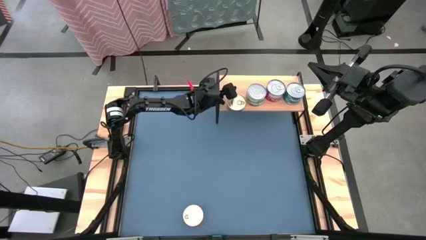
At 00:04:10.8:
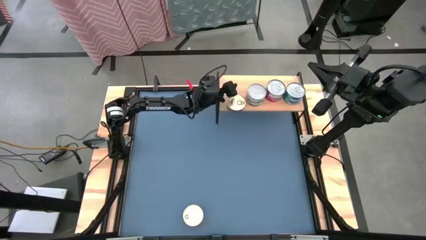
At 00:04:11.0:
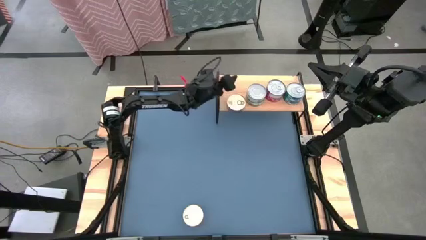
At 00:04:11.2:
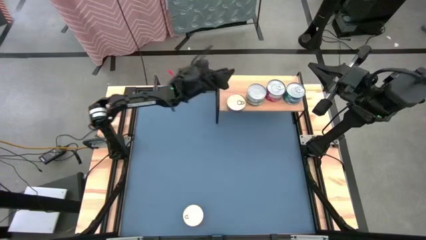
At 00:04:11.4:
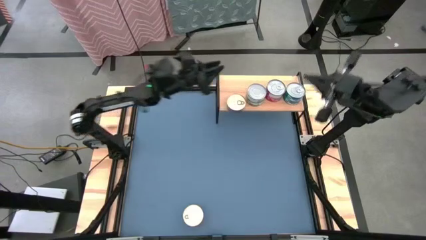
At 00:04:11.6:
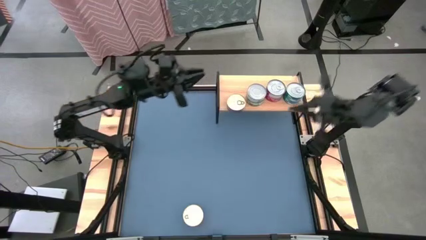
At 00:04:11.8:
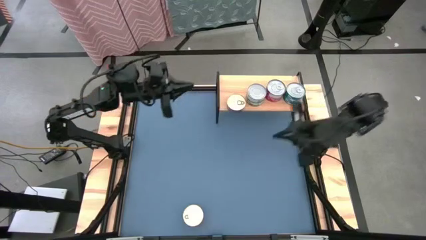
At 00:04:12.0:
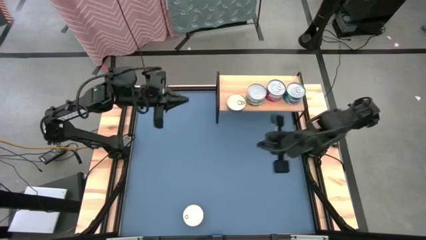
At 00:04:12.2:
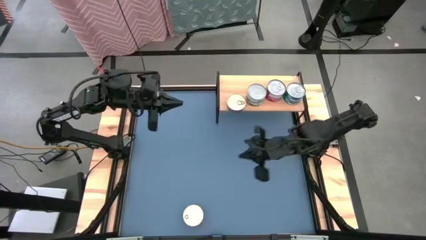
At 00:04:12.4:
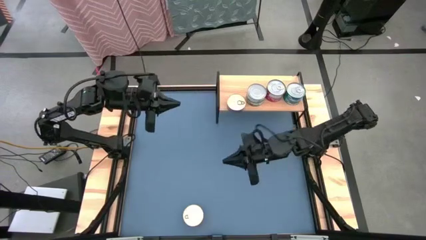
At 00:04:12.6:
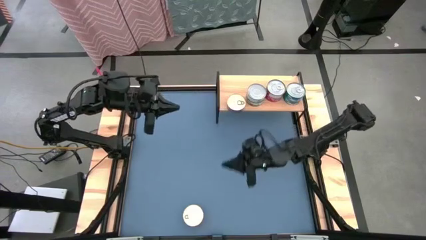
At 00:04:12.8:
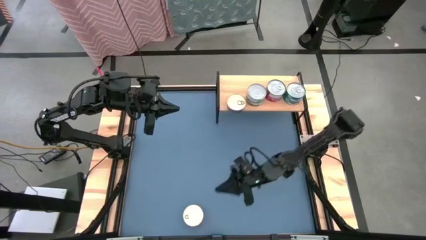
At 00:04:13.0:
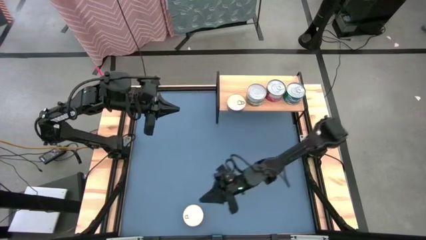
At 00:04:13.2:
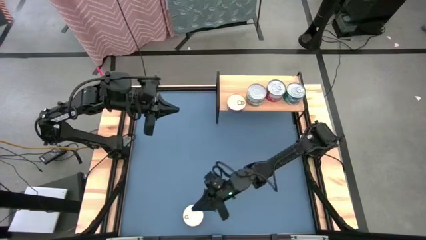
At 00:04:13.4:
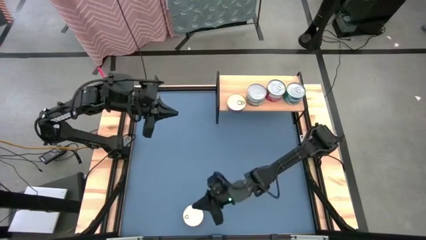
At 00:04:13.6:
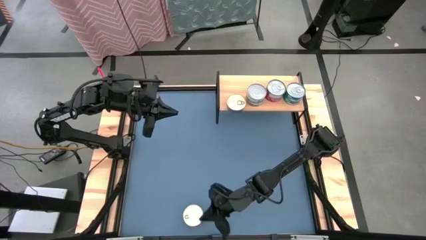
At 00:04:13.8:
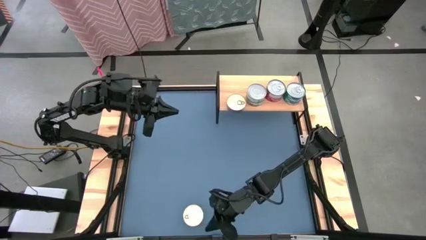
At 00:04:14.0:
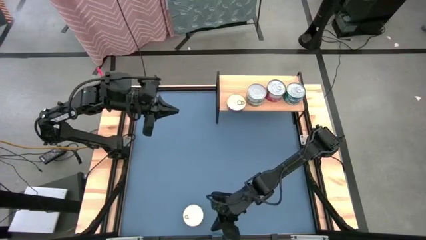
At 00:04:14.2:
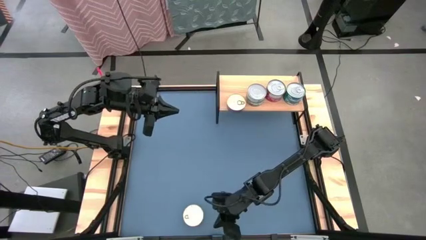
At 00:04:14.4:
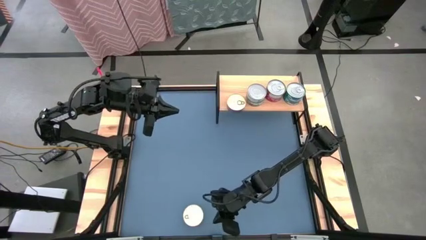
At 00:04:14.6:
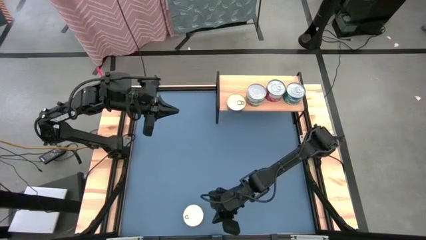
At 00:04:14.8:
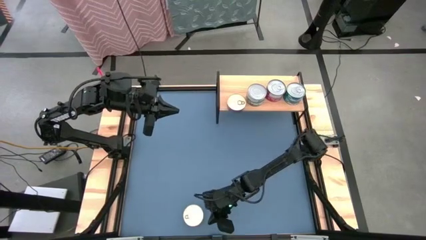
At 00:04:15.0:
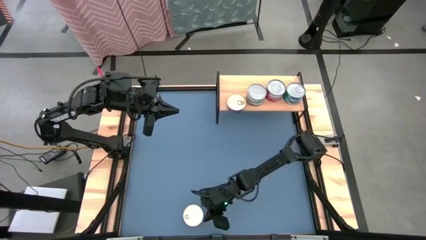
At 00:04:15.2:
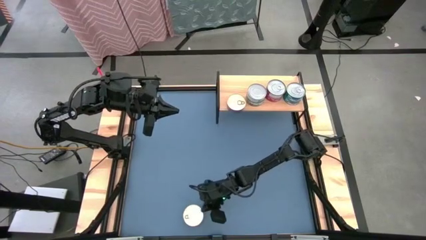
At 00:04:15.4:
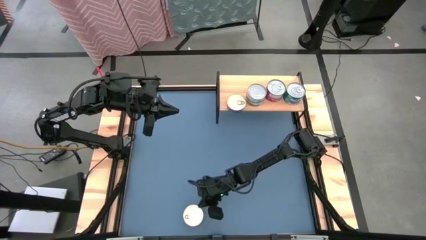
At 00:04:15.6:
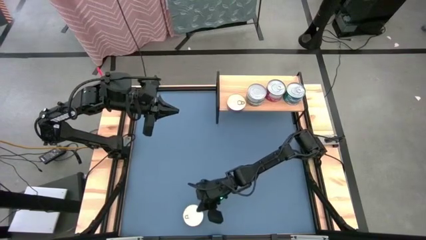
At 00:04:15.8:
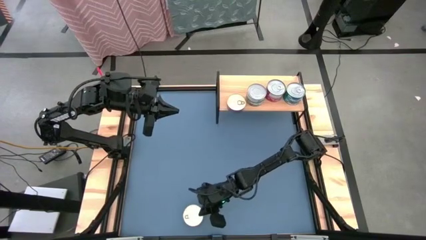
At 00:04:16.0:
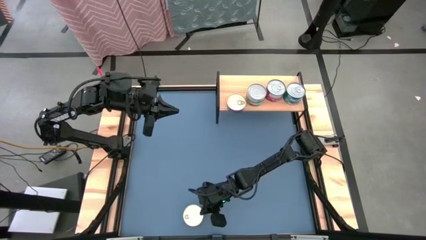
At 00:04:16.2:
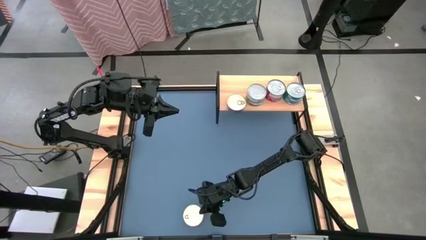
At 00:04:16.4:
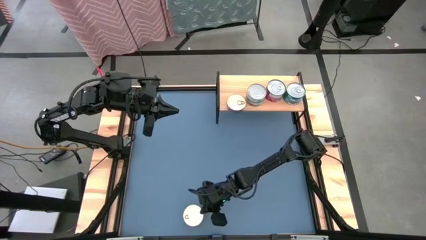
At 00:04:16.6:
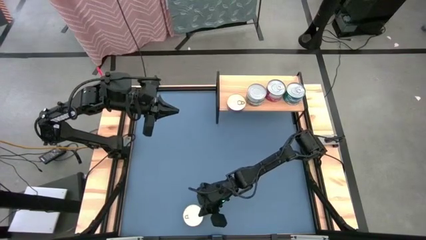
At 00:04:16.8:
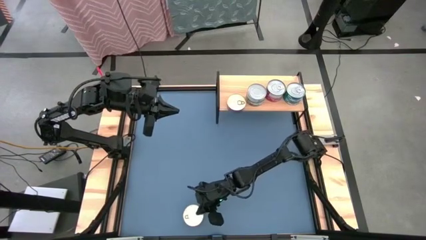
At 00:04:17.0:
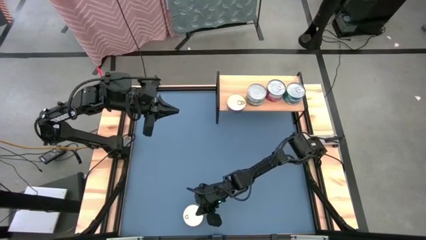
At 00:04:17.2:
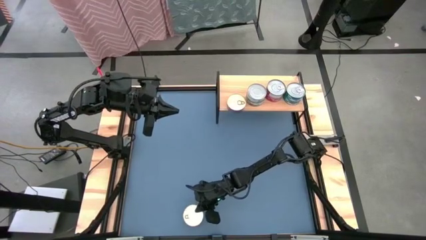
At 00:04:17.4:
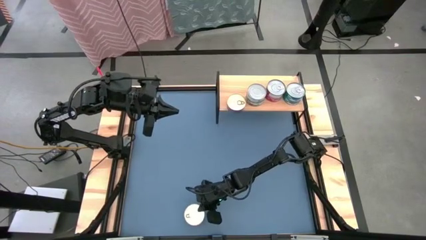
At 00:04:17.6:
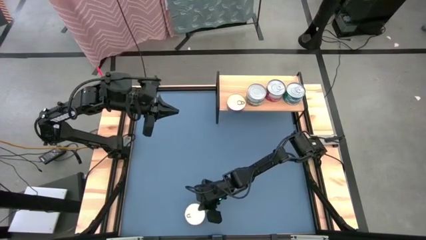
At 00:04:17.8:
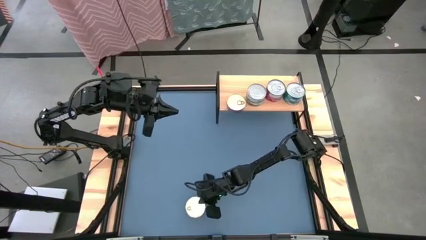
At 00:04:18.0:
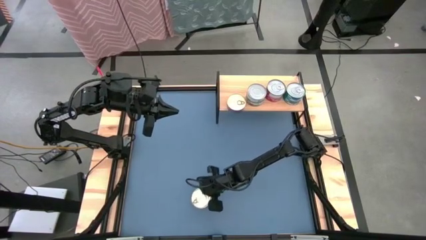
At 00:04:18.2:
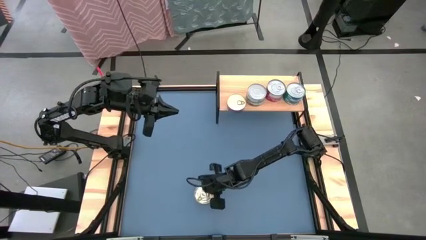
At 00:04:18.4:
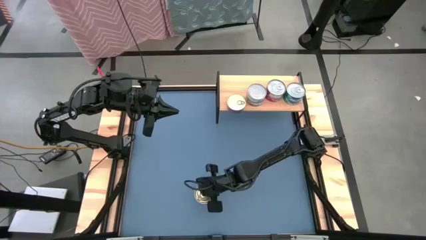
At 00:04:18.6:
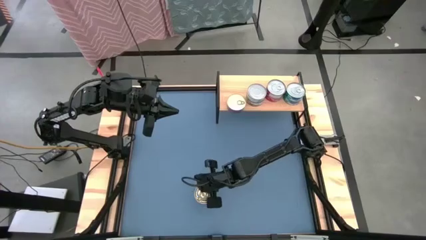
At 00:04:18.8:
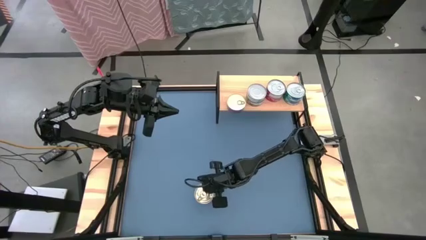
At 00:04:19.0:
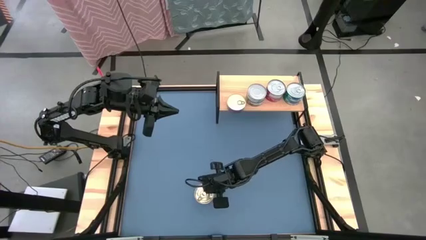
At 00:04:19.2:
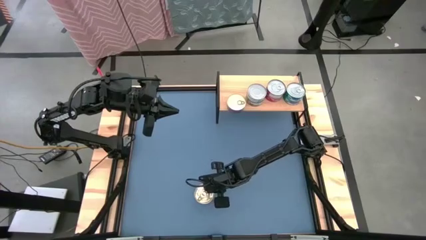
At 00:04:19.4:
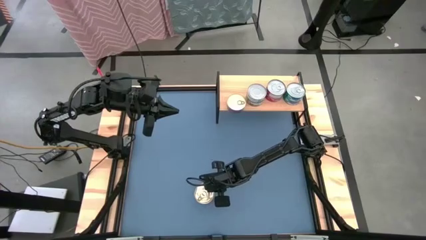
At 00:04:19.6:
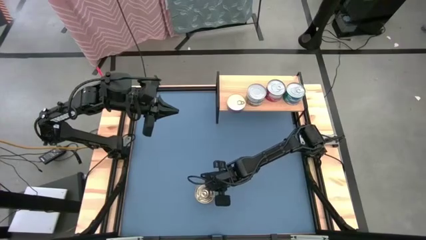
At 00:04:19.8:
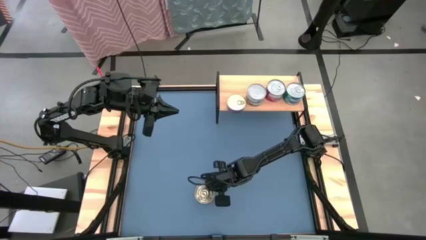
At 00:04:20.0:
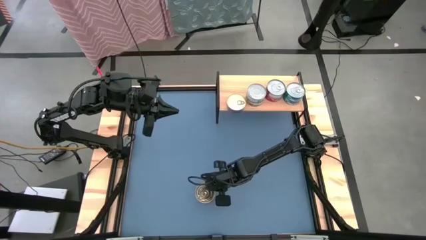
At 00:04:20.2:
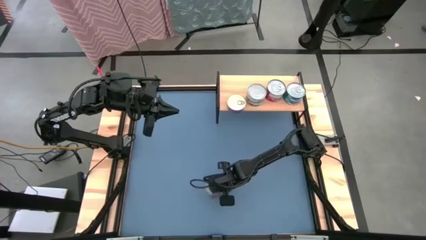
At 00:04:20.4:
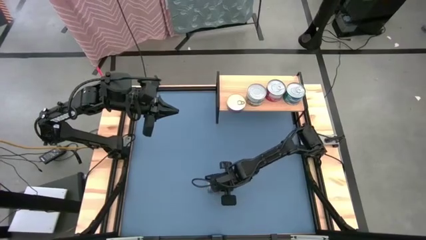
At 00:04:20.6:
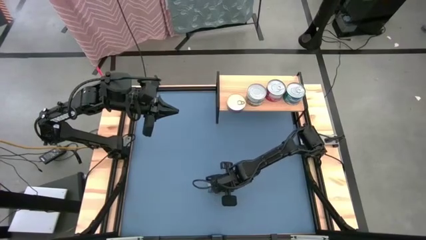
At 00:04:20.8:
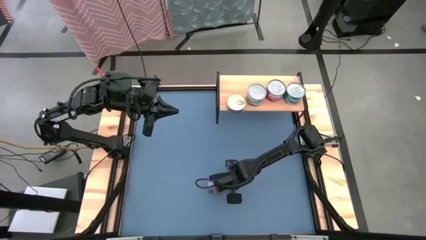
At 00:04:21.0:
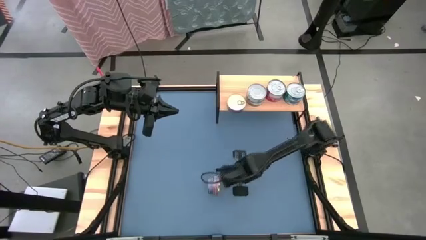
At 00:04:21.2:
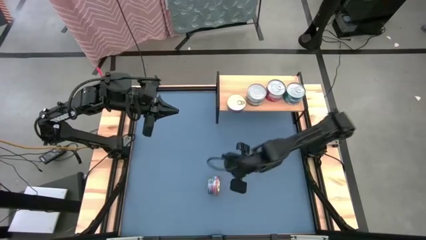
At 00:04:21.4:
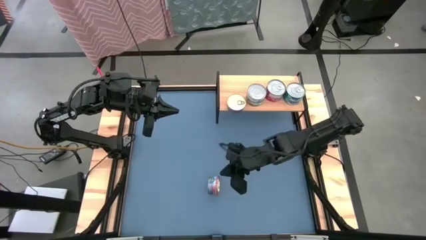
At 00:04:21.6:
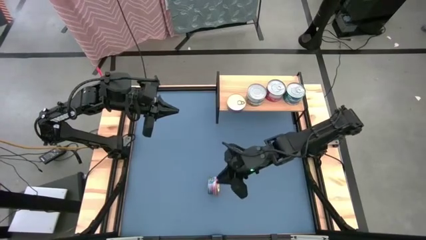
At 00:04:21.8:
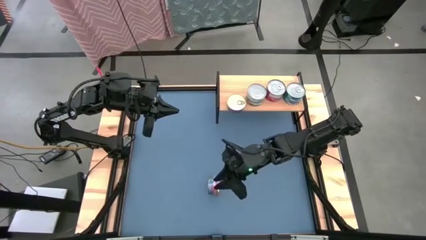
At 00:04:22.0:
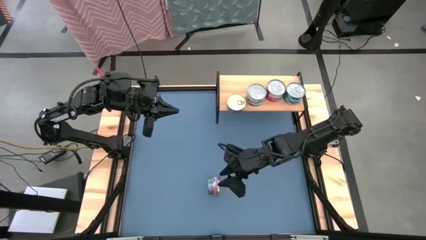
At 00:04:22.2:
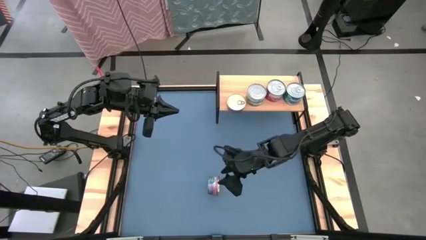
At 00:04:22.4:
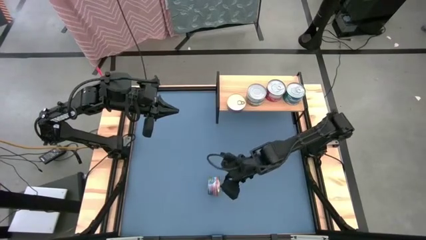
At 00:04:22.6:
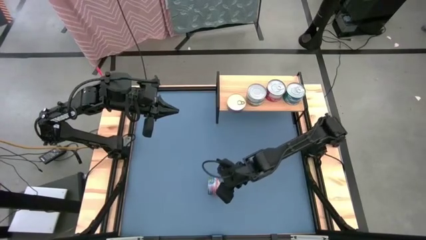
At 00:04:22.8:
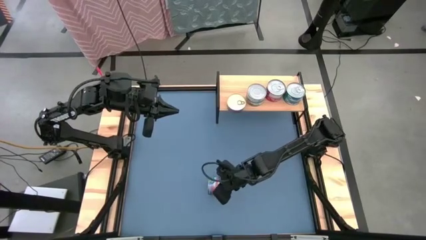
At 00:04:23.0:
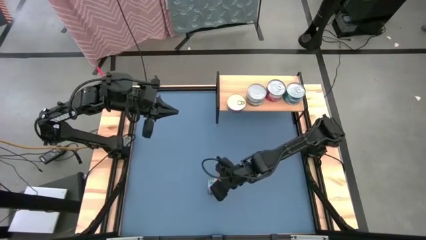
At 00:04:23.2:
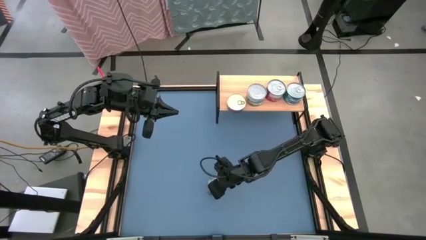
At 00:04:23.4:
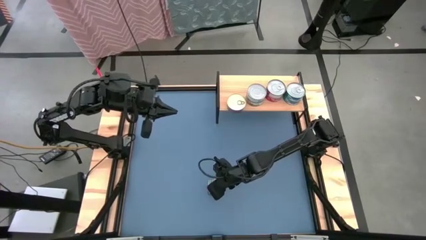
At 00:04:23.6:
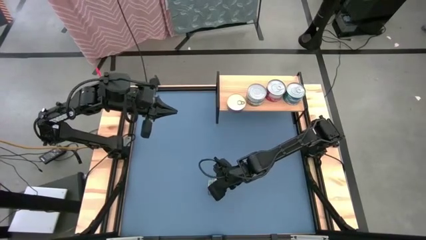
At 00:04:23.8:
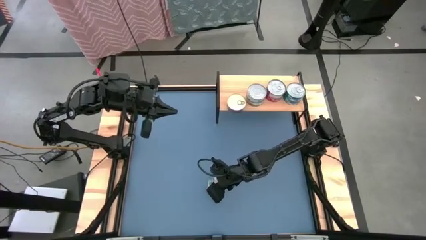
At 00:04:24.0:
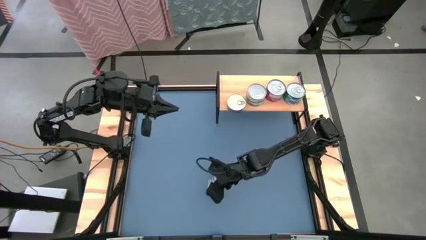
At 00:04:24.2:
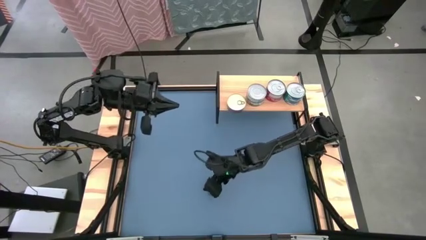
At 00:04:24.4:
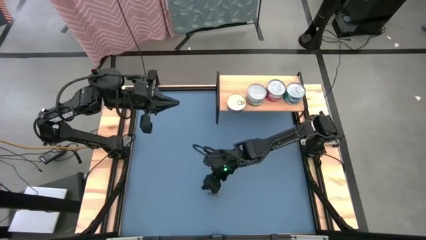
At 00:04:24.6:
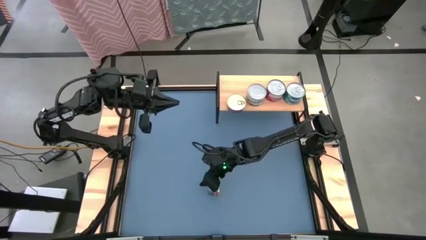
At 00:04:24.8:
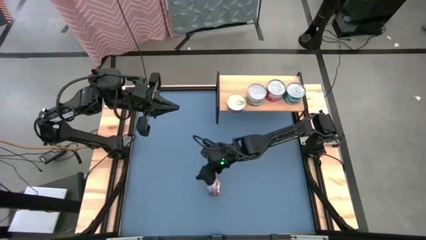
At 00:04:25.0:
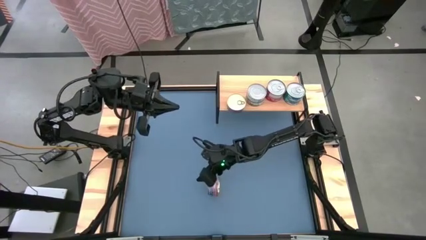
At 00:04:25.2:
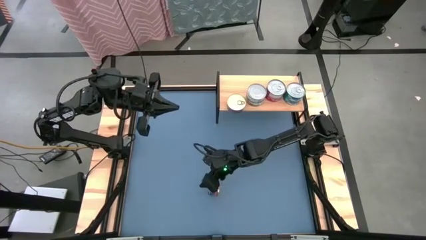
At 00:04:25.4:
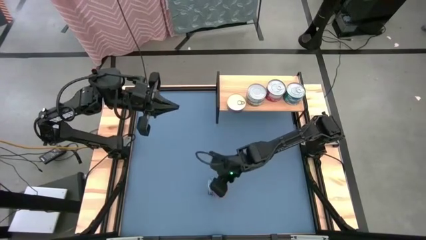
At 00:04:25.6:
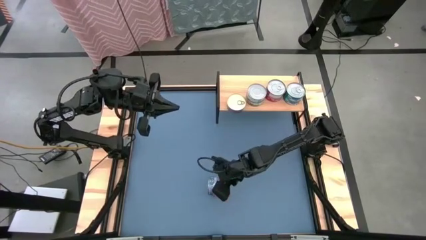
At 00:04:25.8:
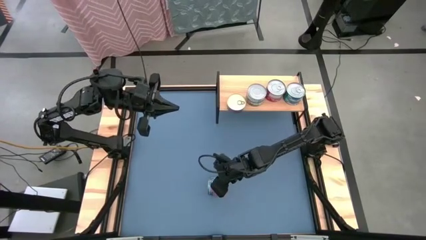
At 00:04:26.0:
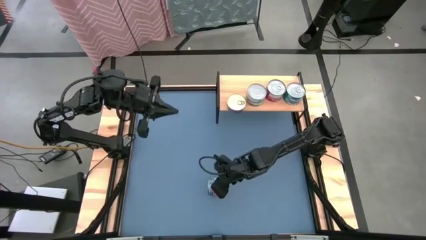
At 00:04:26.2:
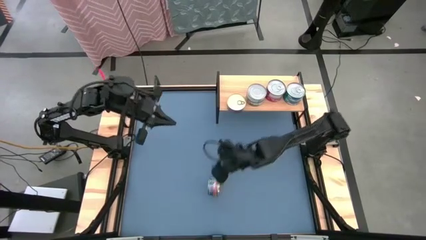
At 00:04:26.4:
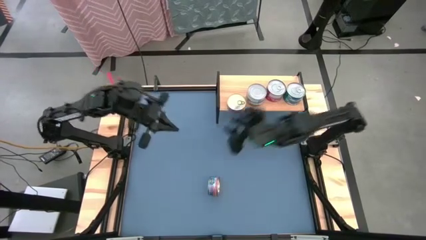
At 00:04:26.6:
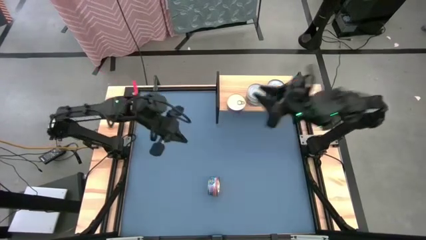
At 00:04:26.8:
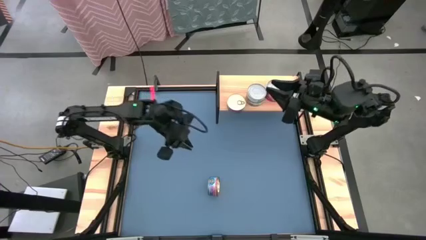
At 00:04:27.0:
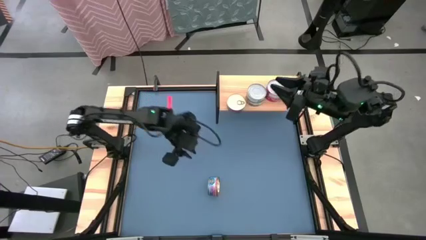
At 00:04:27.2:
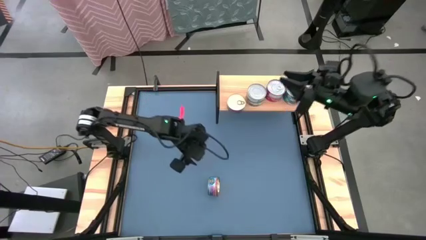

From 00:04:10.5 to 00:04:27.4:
Task: Stack canned seafood by type on shelf
Stack the blue-pink tuna can on top of the blue-pink tuna can on the shelf
